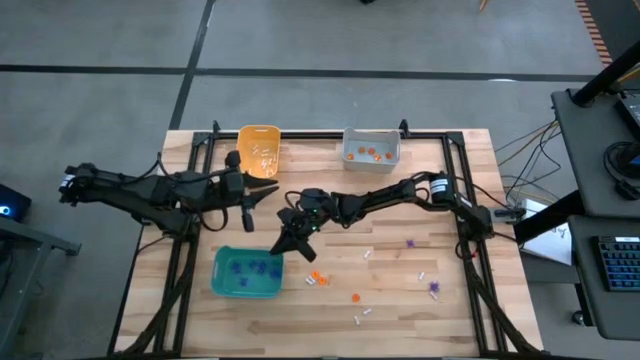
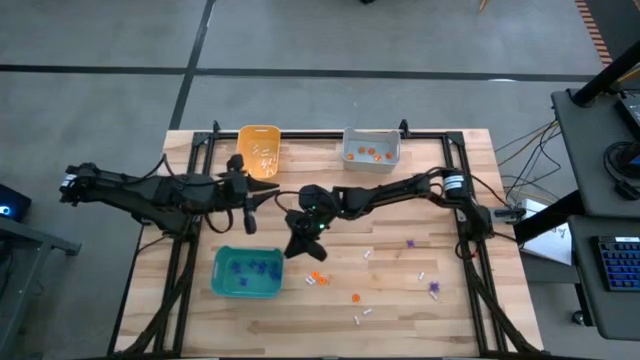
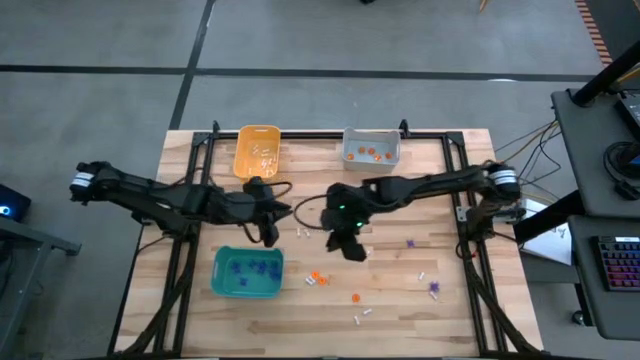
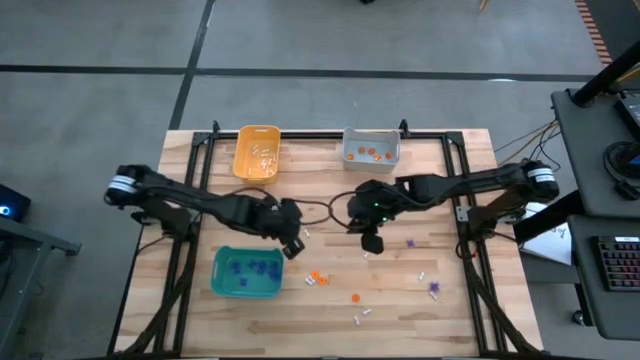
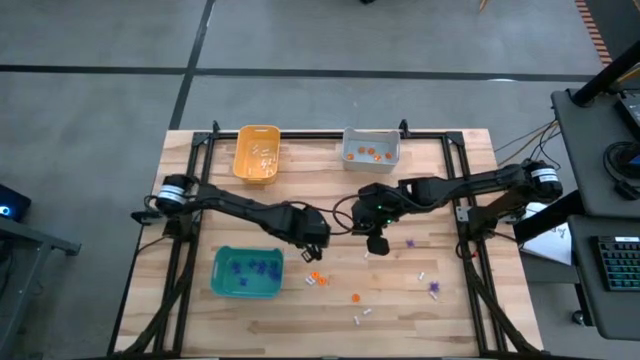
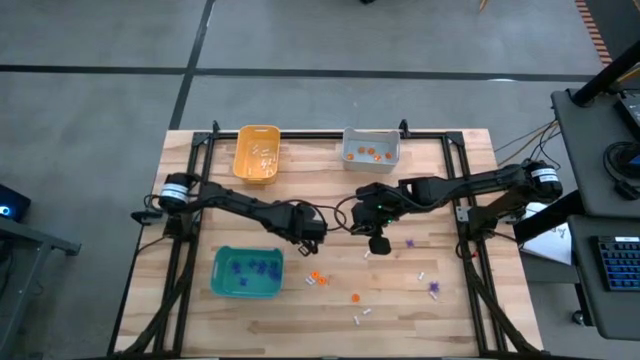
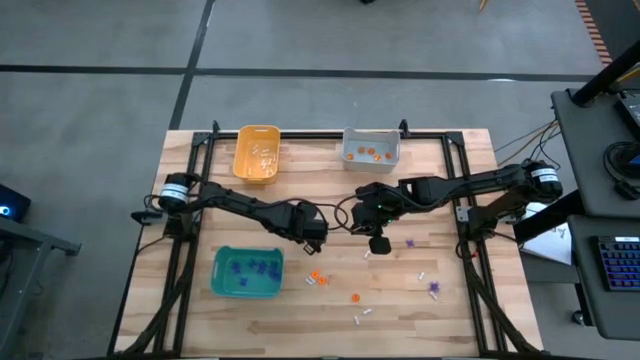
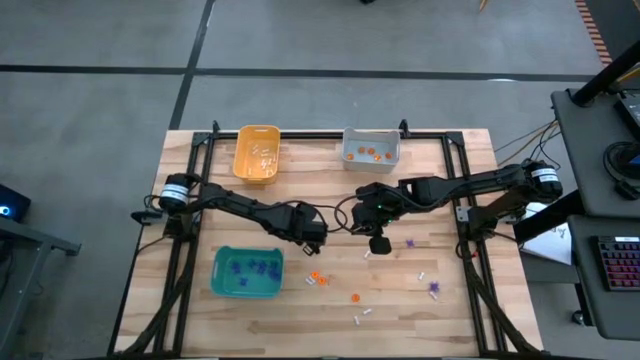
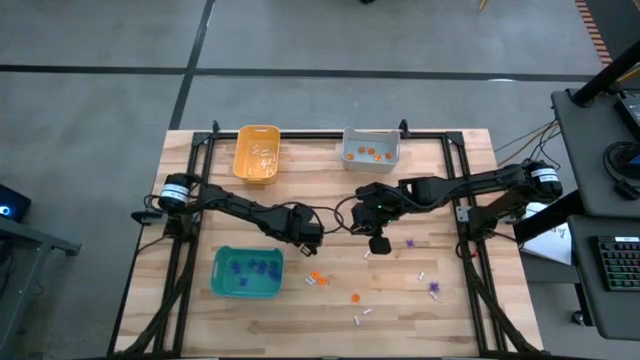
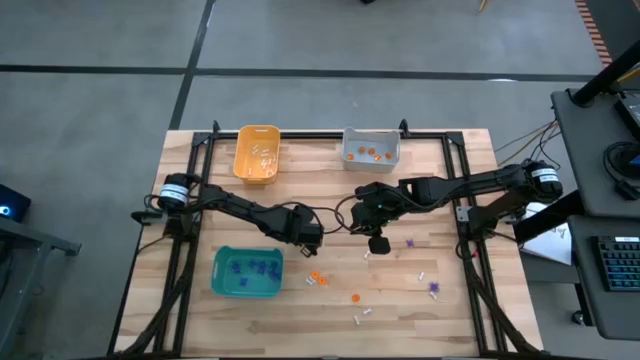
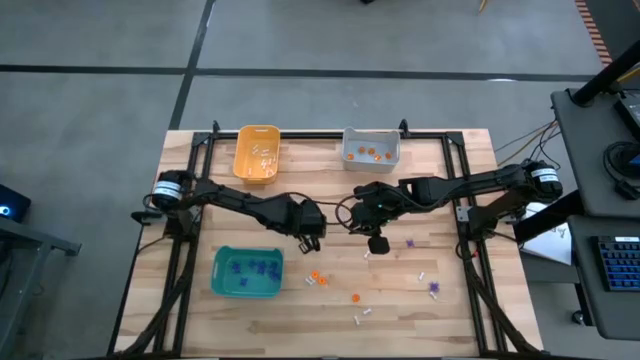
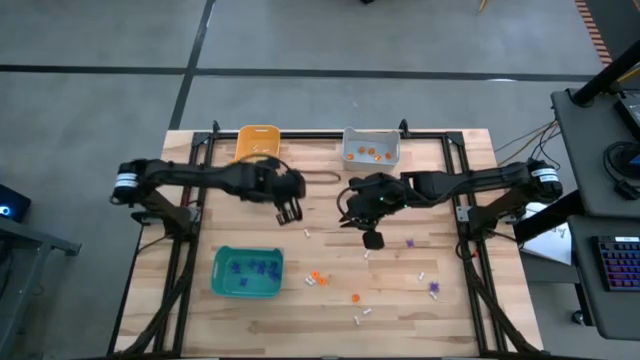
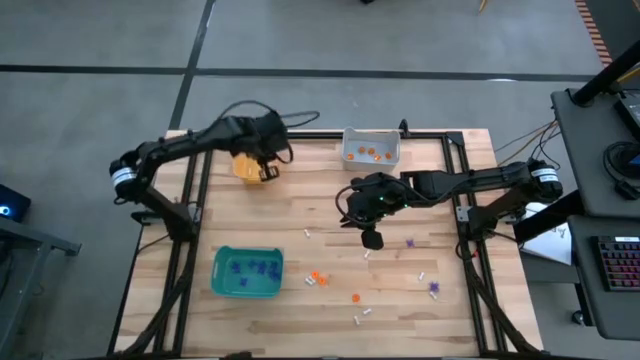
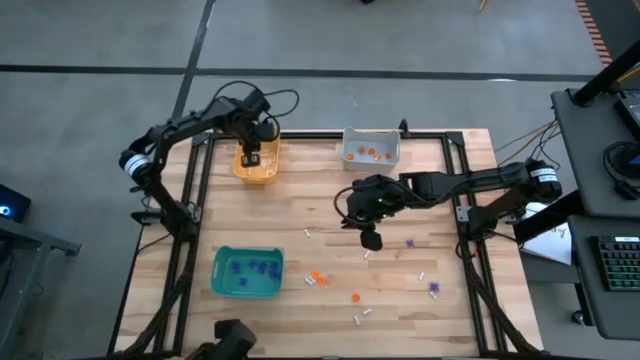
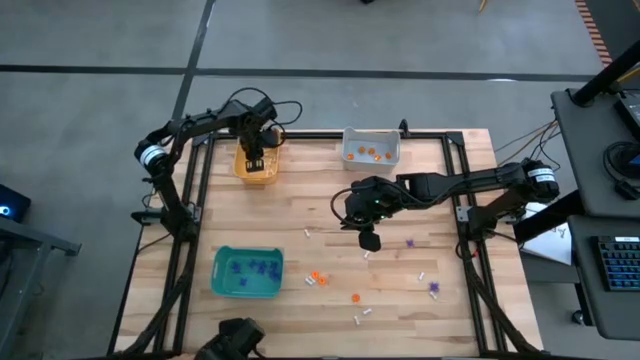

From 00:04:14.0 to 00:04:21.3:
Task: Sort Halloween decoration
Put the white bone toy into the orange bin

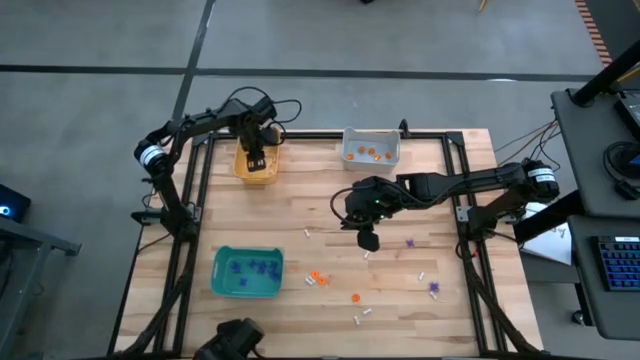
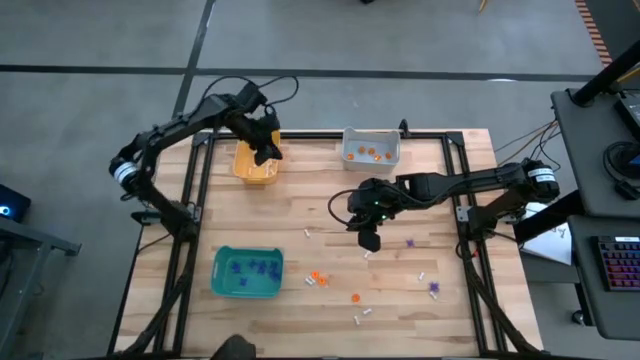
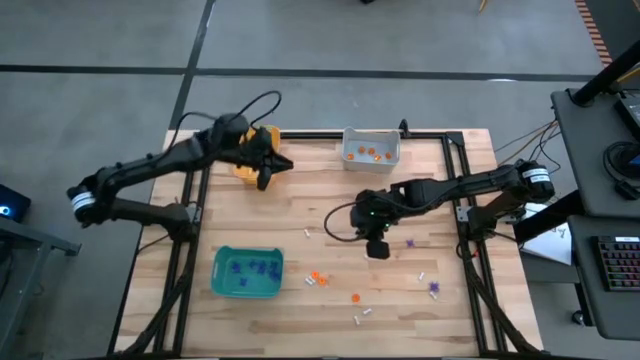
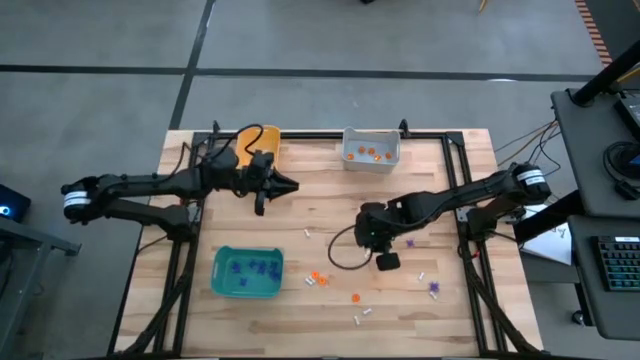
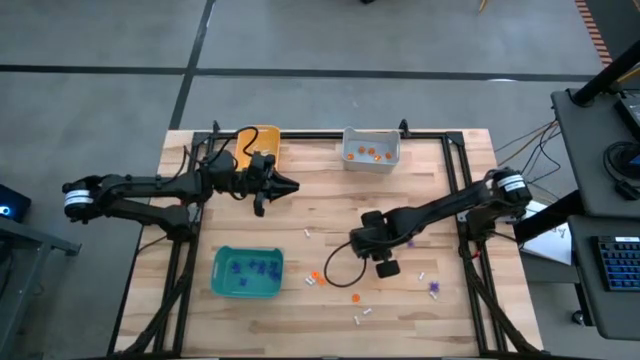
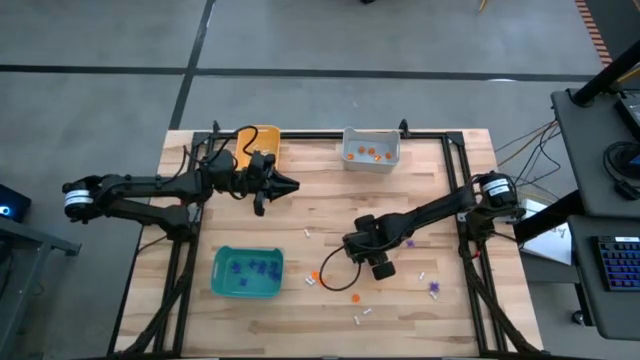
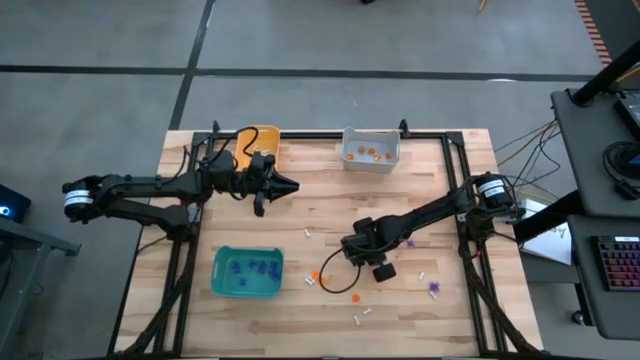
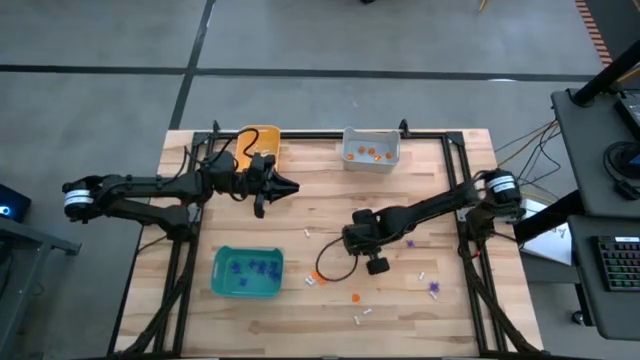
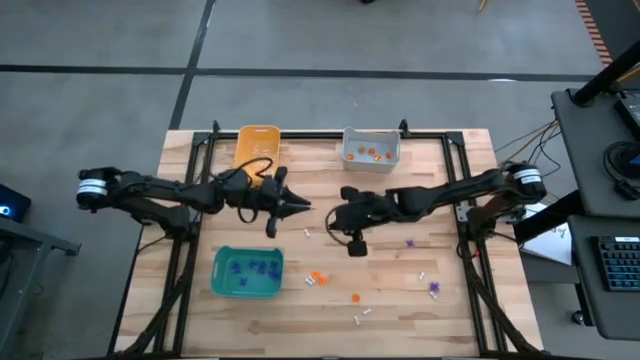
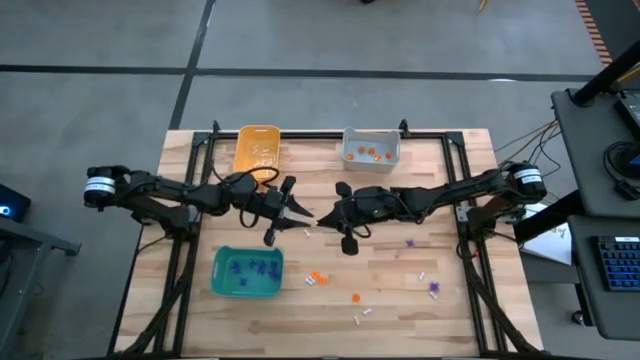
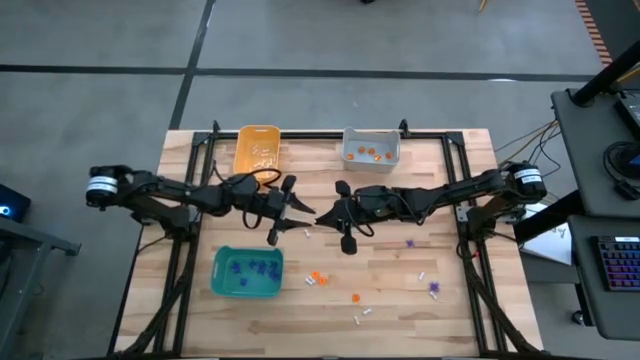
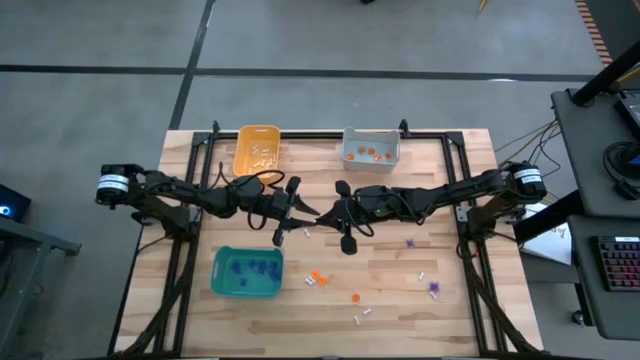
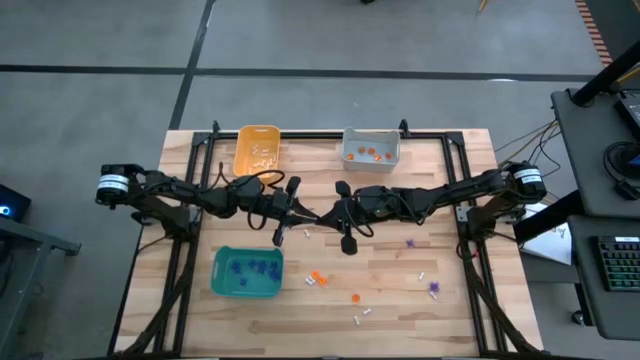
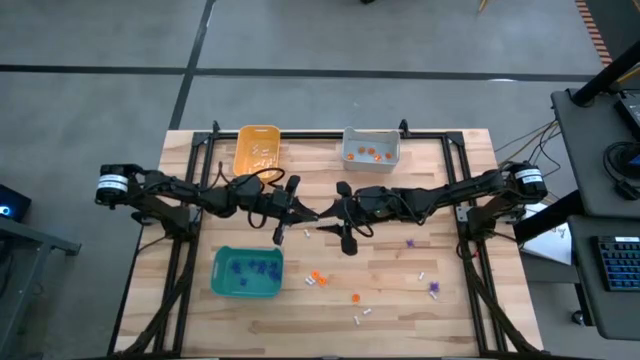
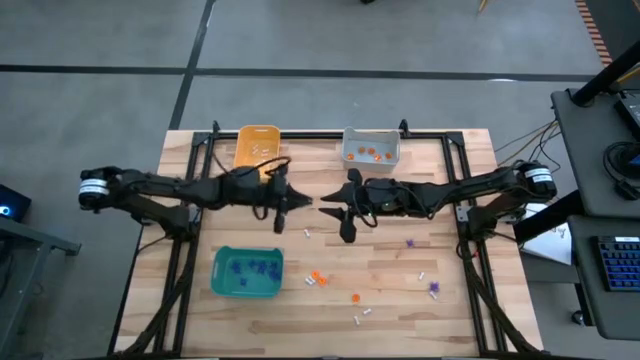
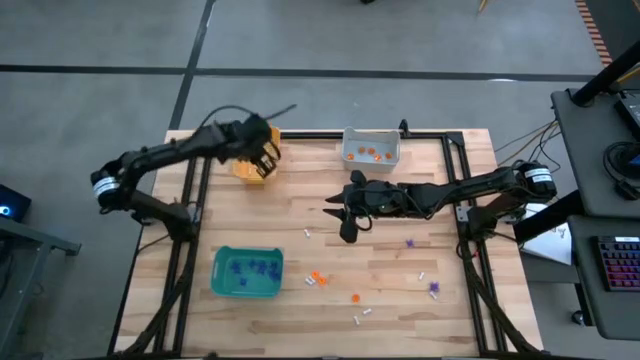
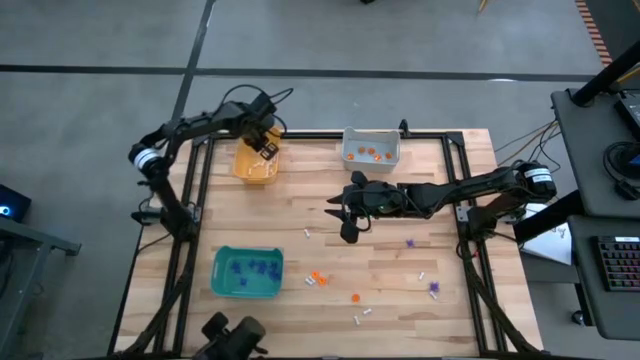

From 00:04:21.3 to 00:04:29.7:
Put the white bone toy into the orange bin

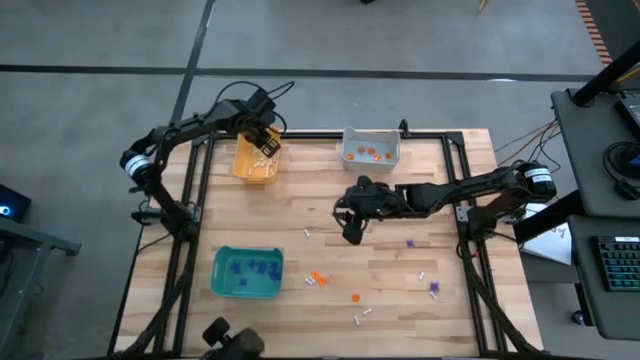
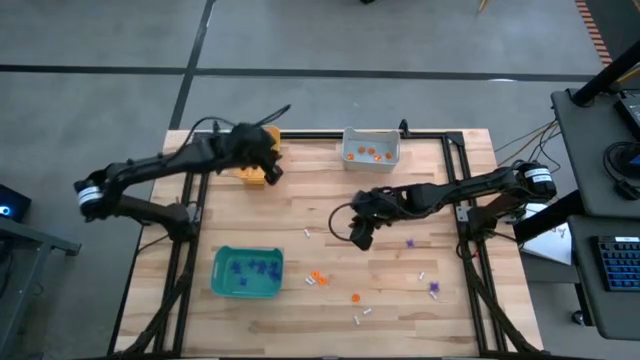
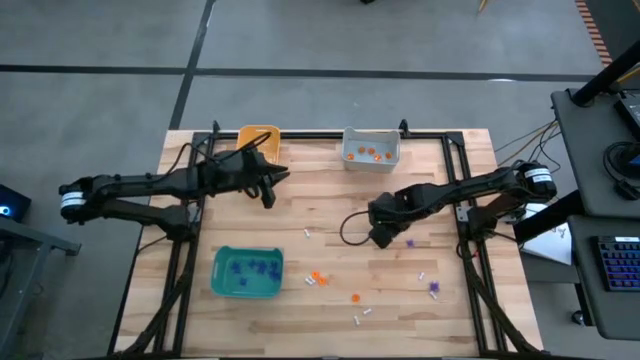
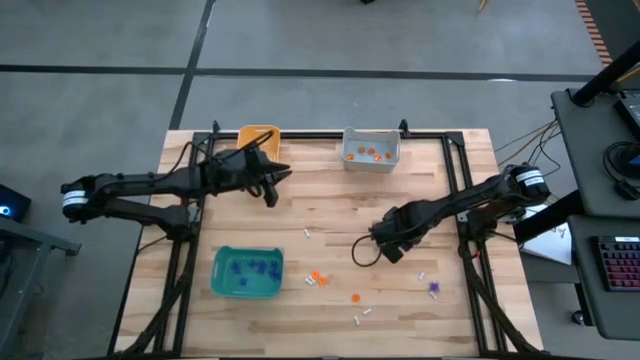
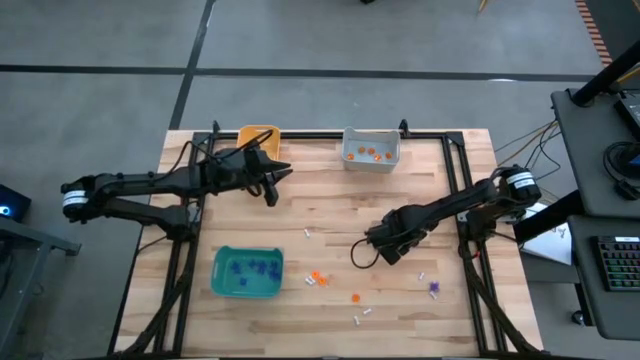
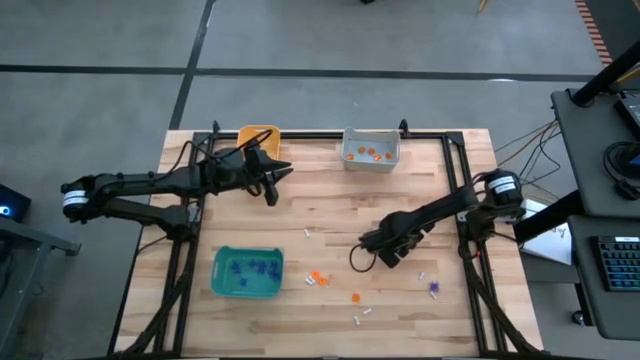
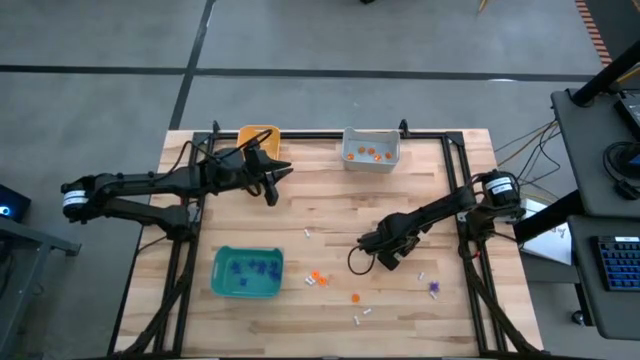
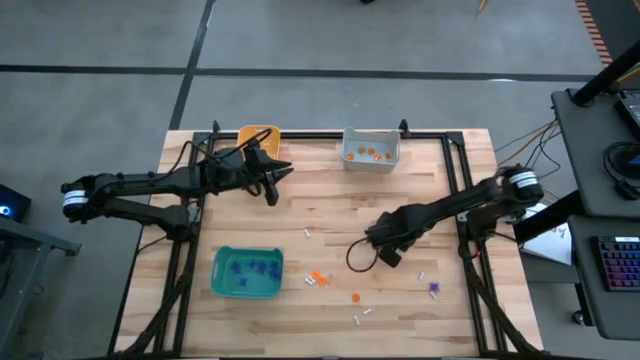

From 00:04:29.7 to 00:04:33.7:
Put the blue spider toy into the green bin
